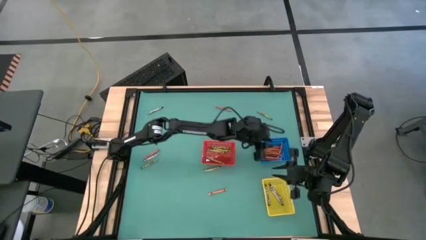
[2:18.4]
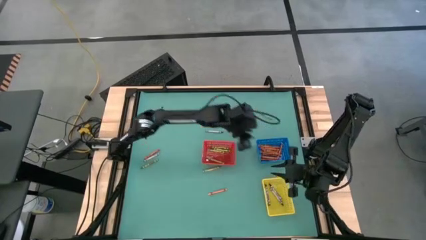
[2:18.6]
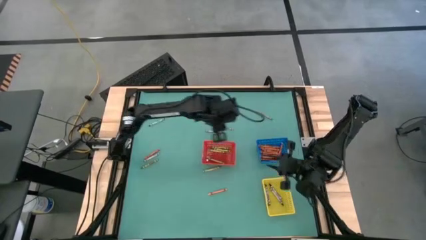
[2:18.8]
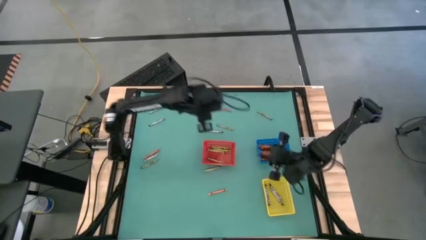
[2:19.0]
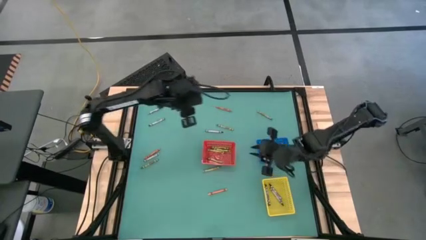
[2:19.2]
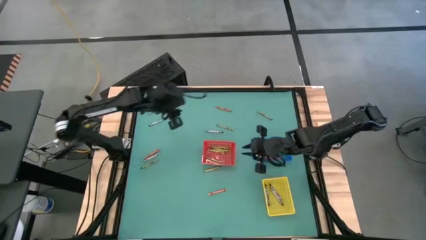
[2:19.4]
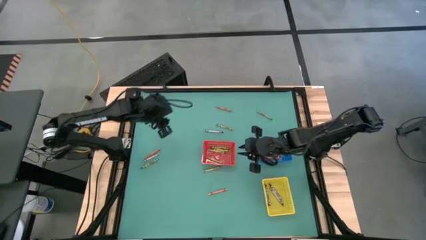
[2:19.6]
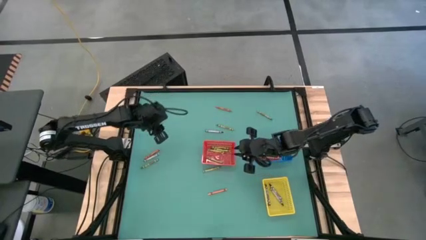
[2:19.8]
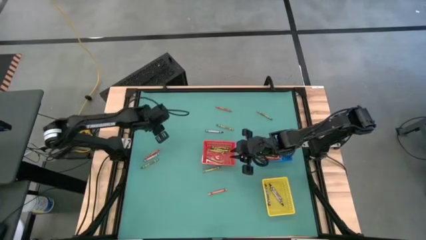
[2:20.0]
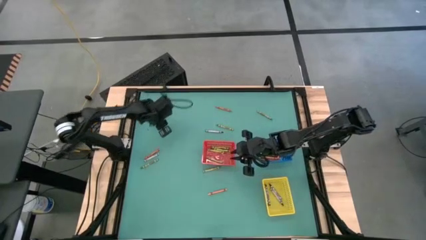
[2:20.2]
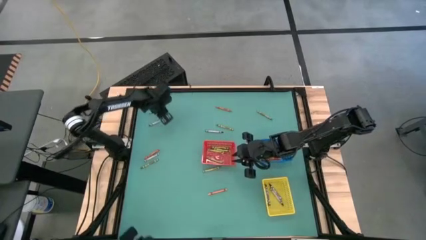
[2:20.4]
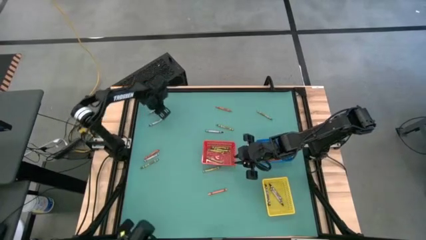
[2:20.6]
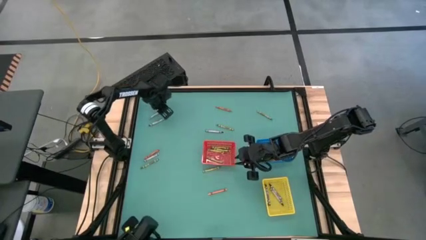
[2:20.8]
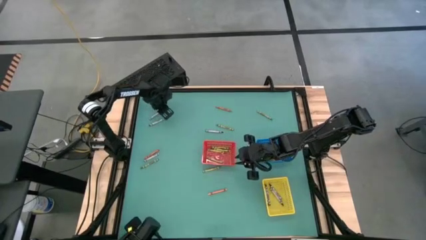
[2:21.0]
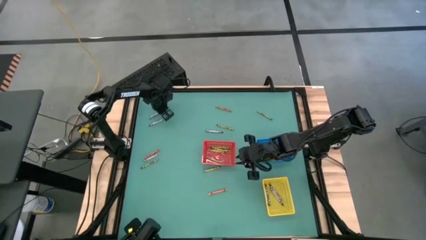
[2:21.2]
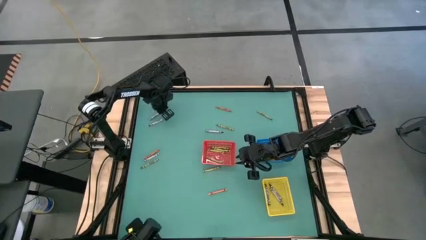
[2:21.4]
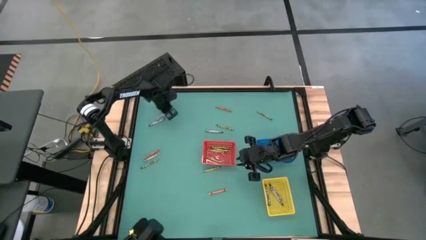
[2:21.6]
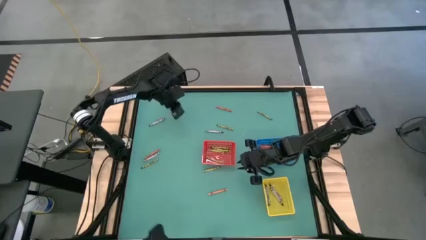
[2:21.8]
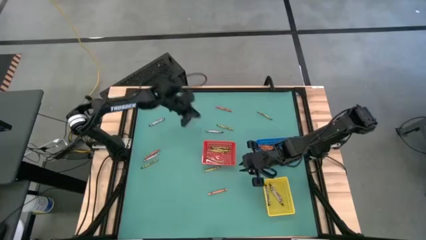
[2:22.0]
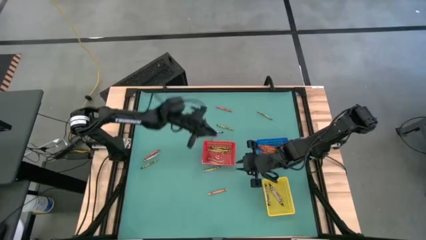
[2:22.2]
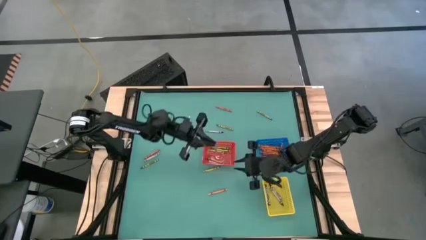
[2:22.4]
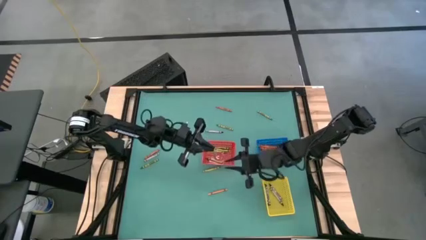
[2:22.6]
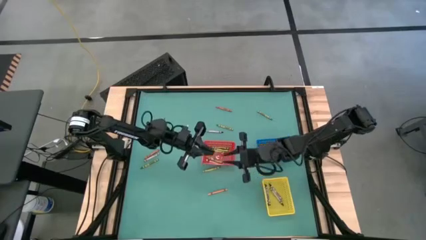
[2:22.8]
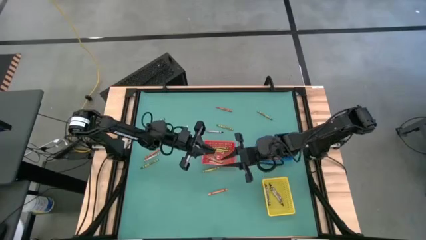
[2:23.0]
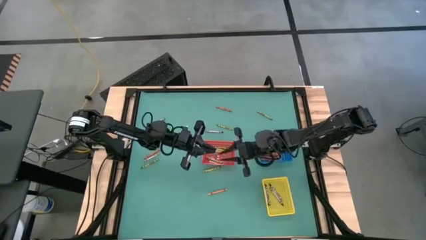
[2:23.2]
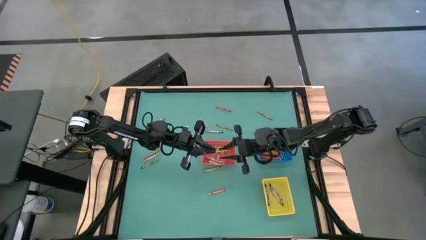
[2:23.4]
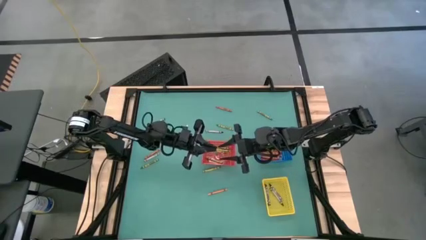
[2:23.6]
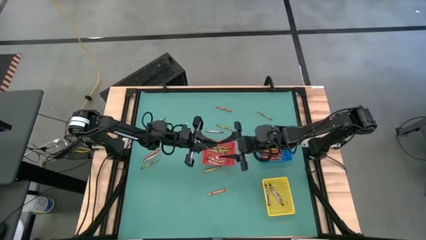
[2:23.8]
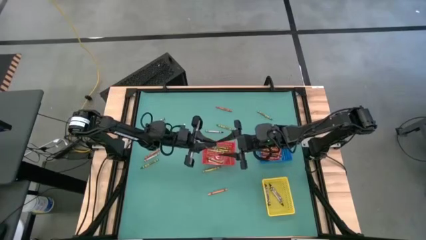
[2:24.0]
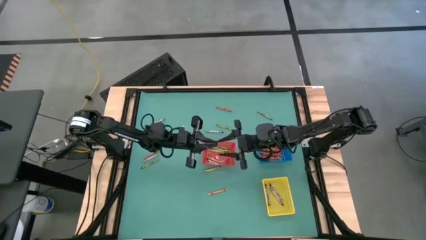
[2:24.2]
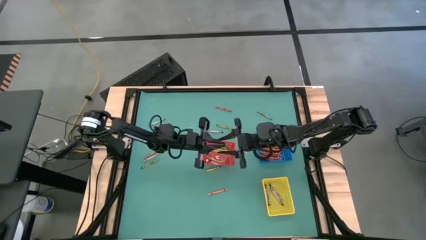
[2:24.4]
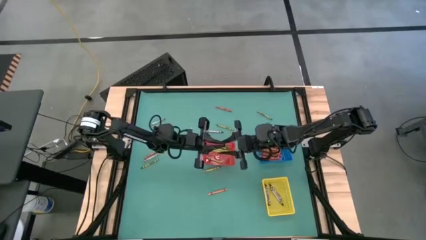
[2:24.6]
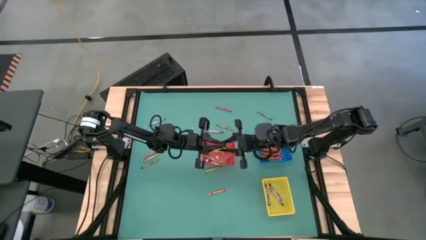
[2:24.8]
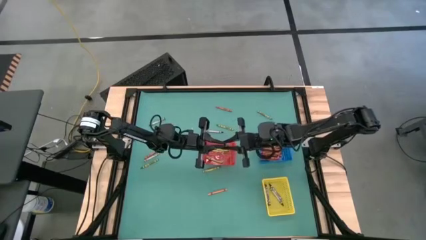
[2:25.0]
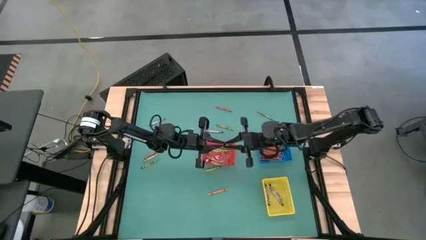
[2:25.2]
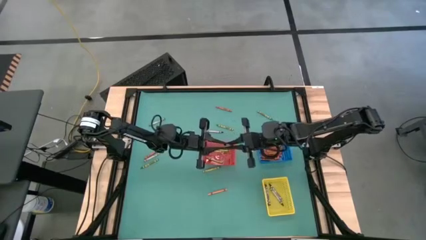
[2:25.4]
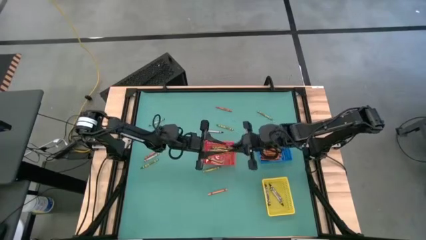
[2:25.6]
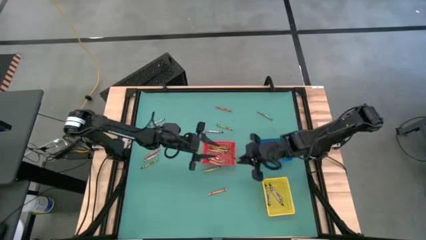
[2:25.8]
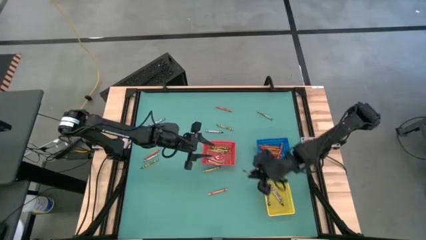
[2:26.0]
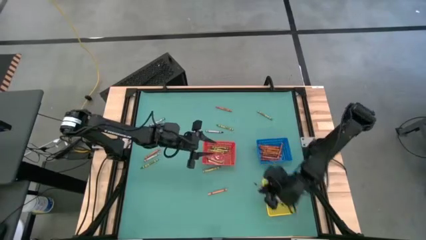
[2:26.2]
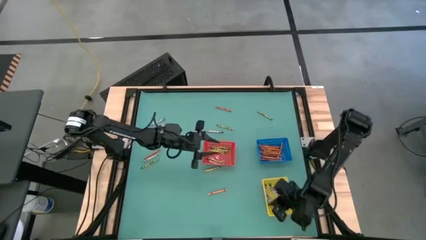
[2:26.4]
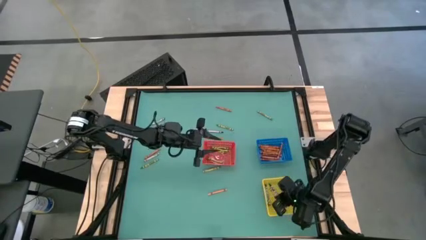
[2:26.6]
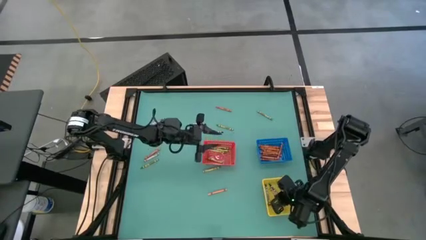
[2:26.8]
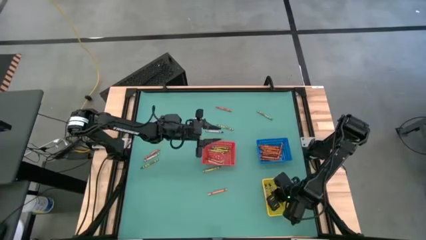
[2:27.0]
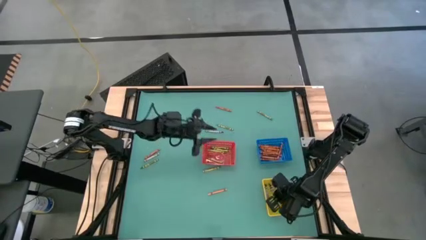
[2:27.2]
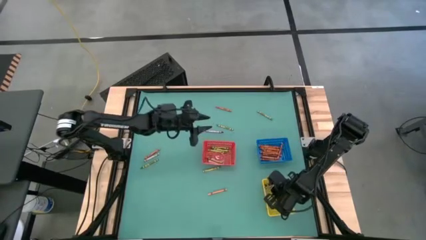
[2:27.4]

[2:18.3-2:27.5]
Task: Sort crayons
Put the black crayon into the yellow basket

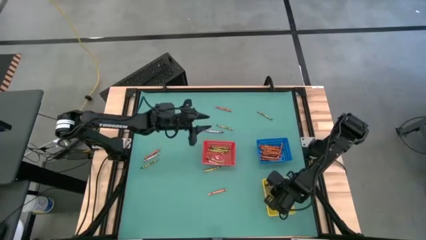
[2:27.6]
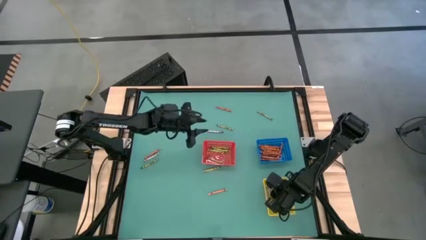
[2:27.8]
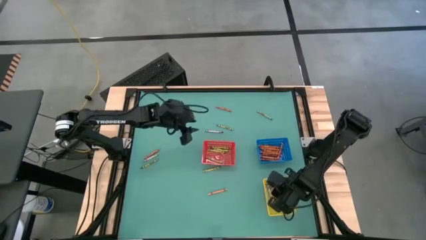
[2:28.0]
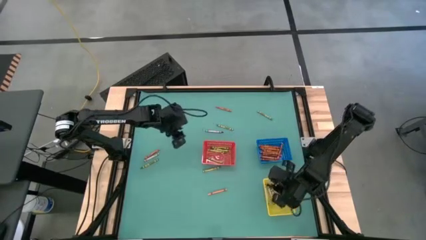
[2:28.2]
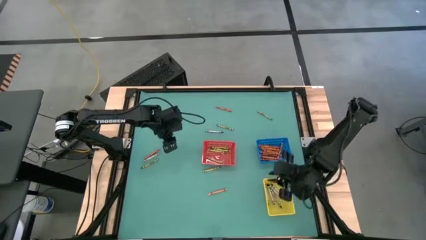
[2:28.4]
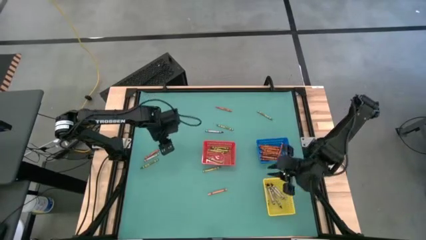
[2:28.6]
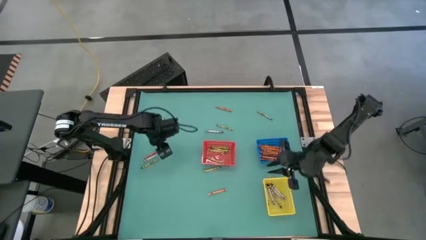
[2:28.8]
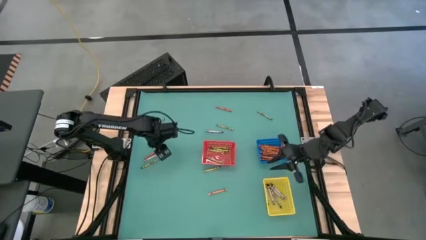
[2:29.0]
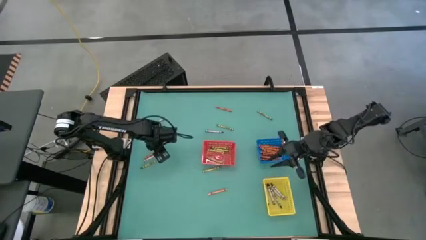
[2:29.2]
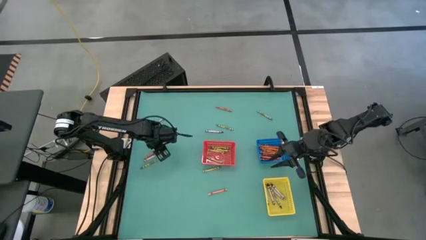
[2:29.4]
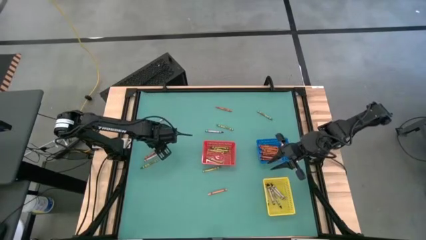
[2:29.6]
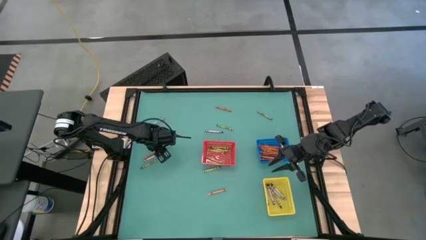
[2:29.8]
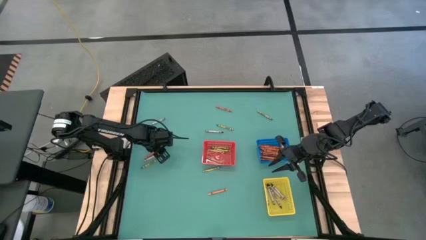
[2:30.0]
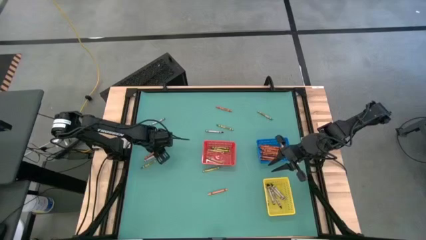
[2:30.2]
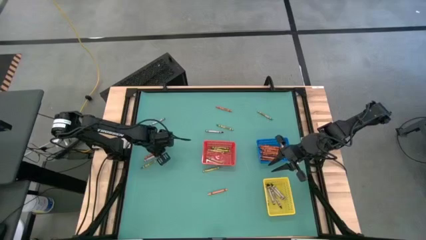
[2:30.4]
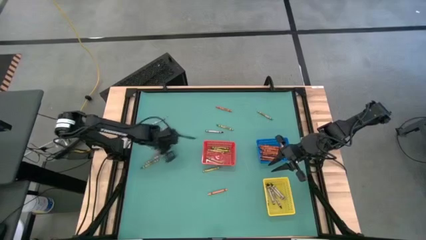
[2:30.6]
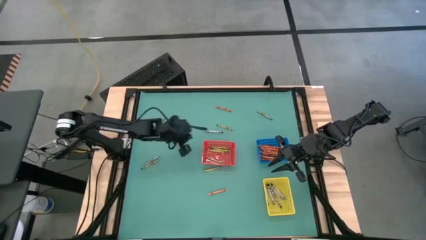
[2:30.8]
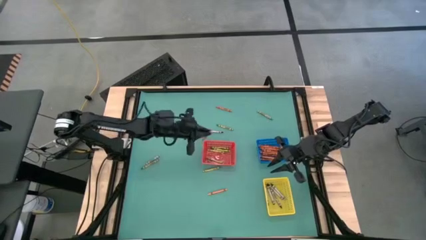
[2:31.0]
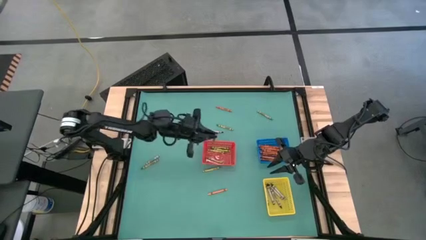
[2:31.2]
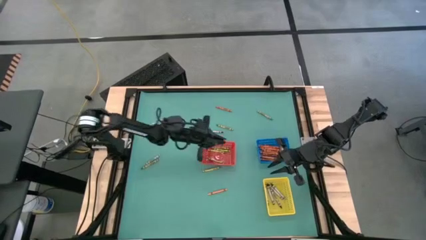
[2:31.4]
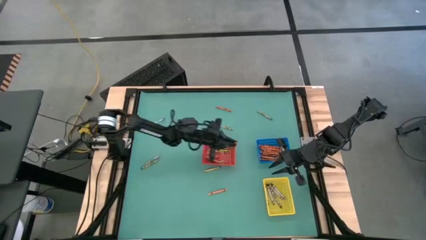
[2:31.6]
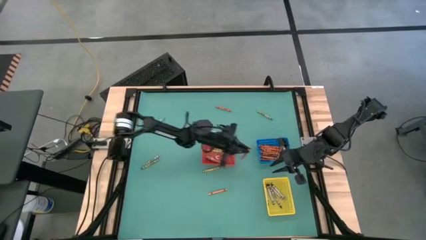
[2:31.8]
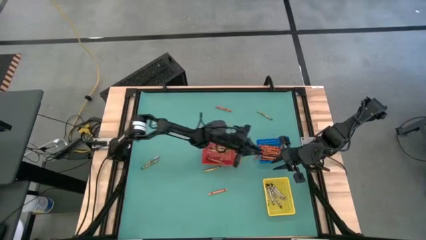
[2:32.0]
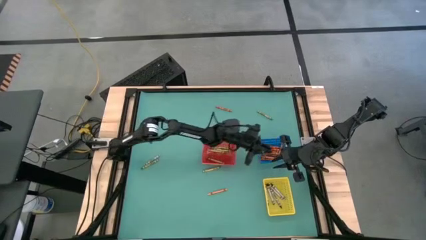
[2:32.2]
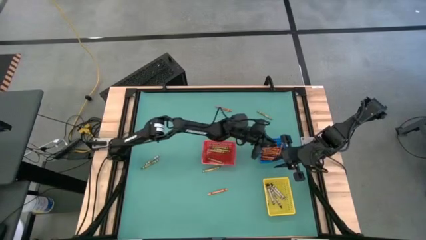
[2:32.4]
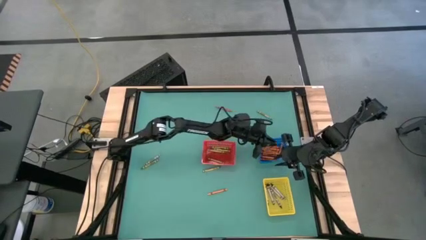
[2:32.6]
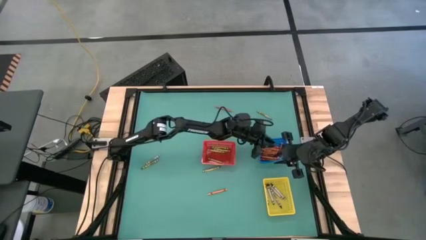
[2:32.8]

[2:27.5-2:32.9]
Put the orange crayon into the blue basket

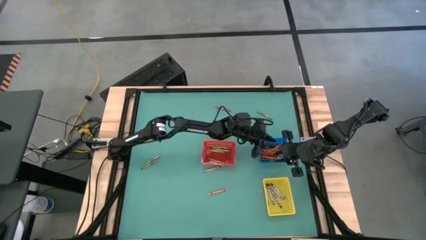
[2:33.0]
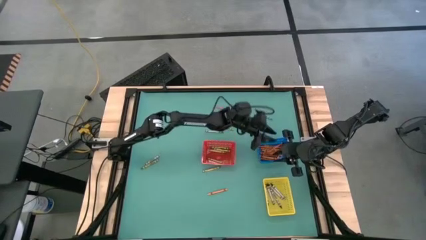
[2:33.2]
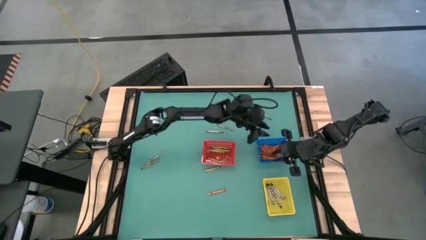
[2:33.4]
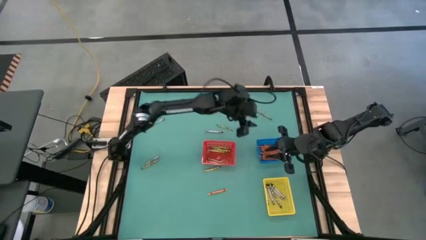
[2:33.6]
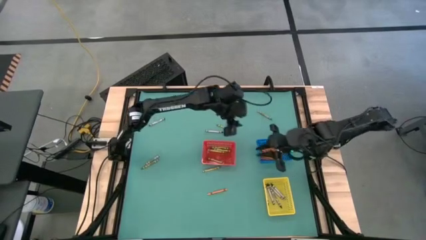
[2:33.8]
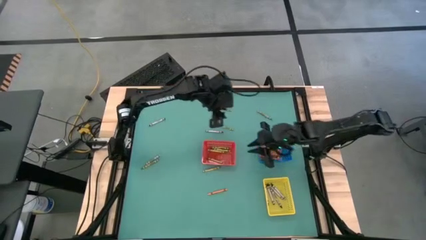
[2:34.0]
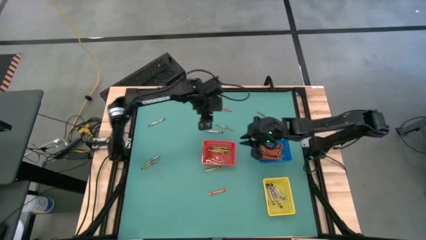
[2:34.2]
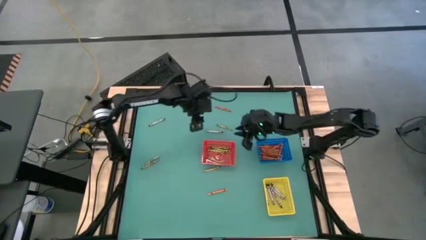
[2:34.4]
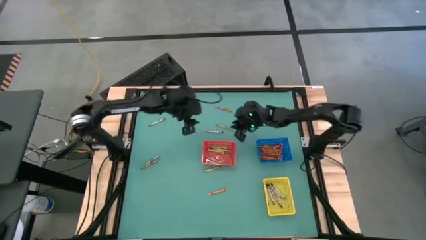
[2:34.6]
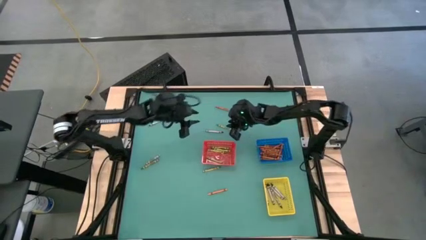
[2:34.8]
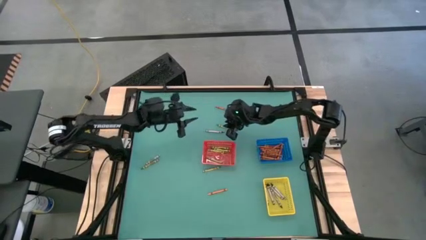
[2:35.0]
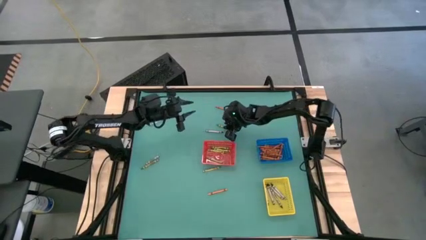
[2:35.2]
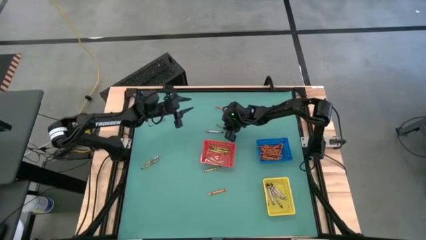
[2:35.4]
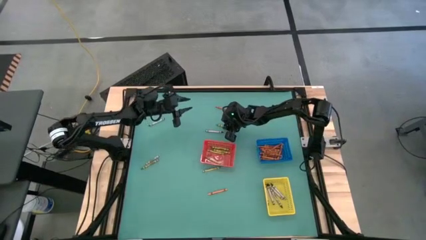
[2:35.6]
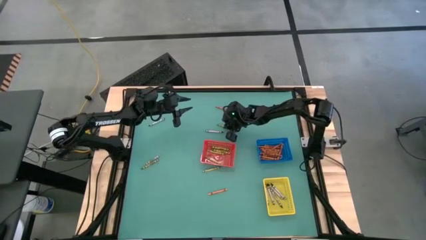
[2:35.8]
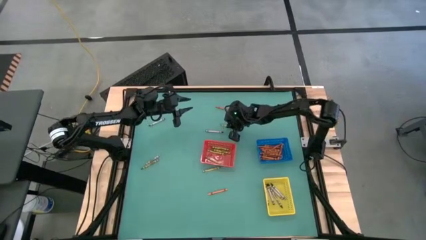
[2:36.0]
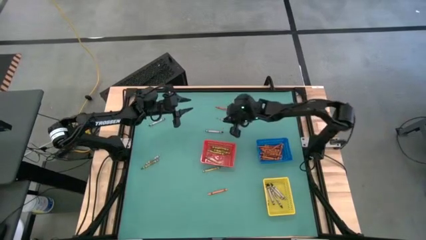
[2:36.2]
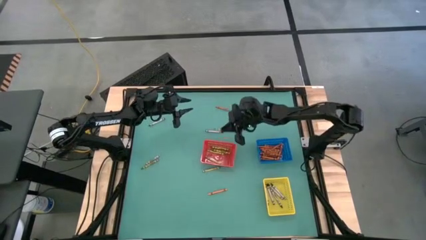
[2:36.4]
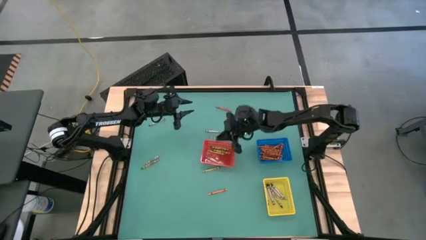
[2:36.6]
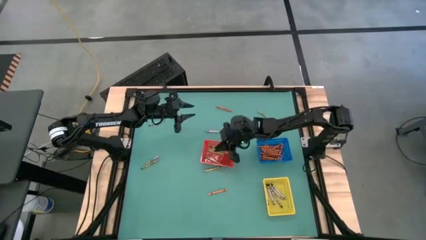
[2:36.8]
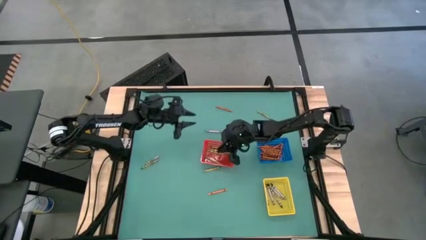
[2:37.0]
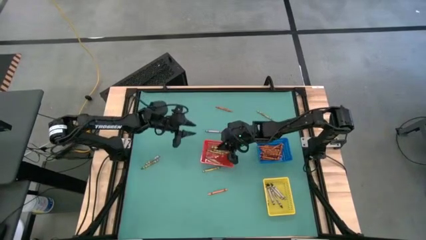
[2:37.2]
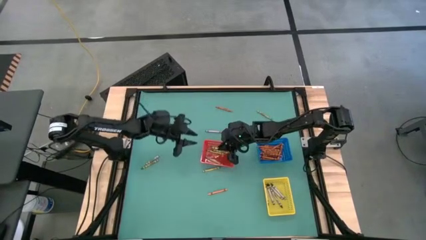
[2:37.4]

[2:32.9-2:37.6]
Put the green crayon into the red basket
